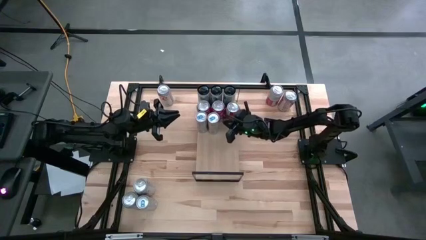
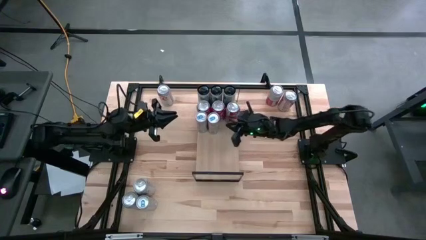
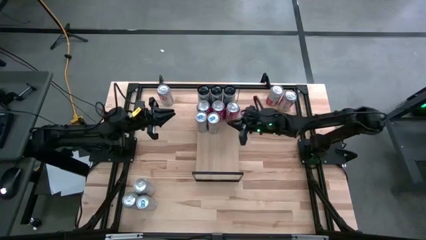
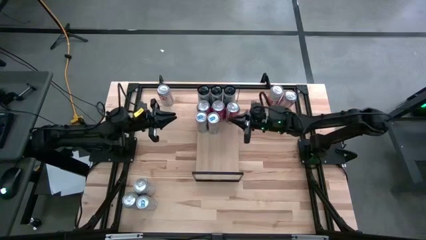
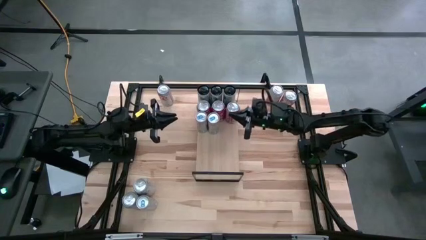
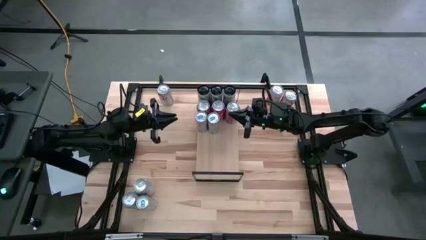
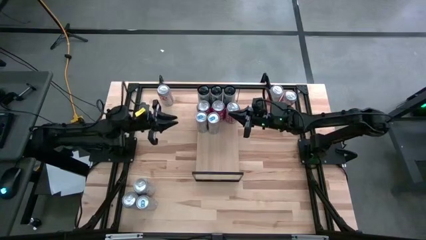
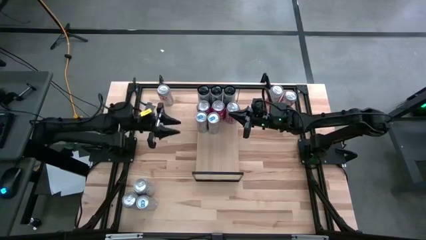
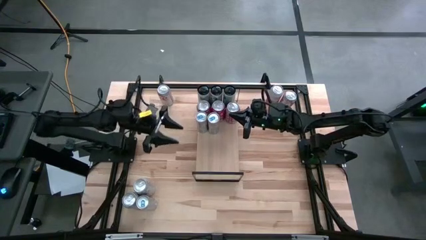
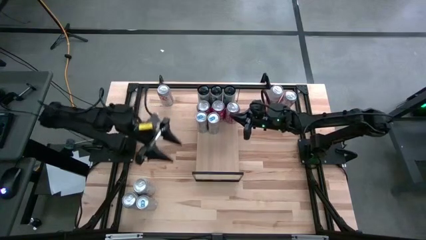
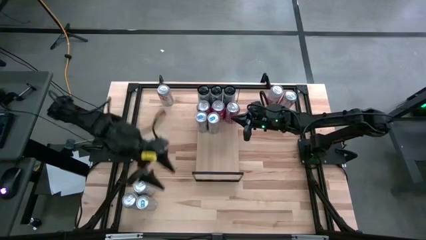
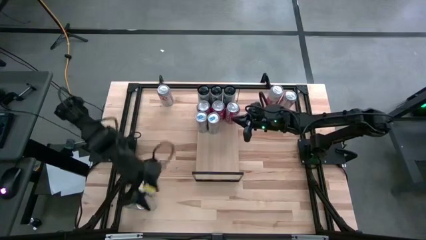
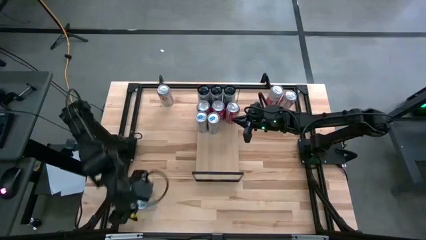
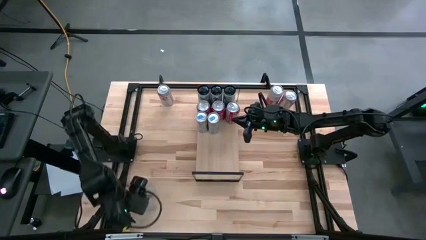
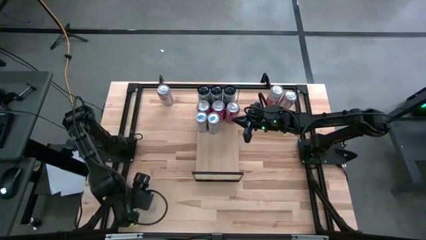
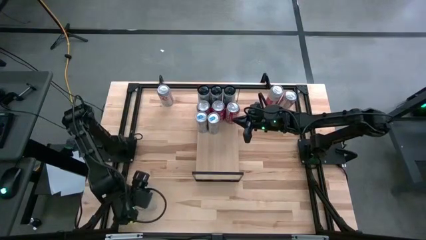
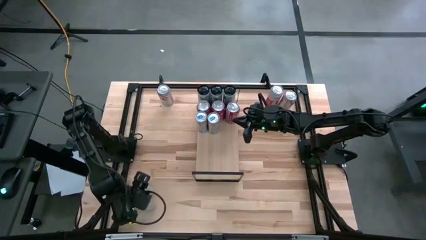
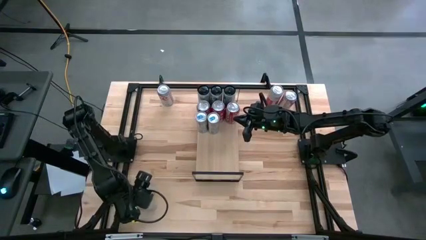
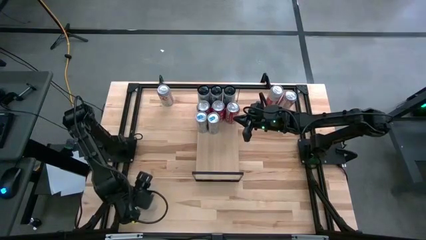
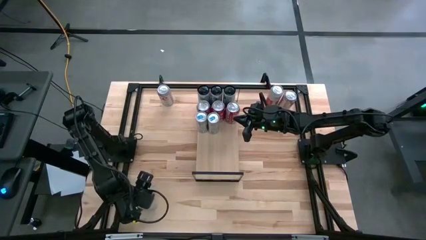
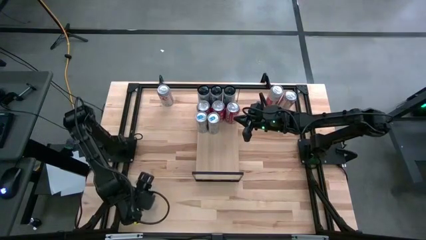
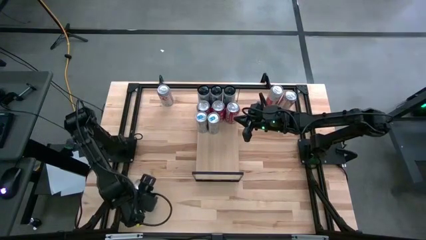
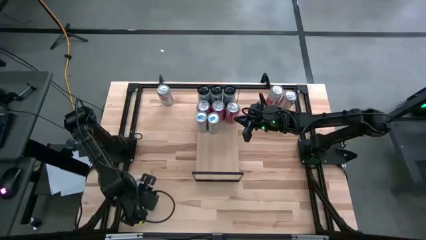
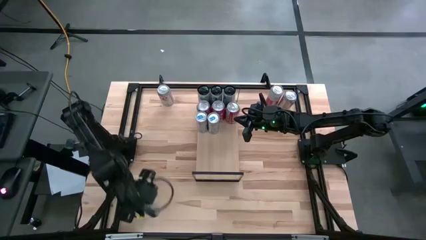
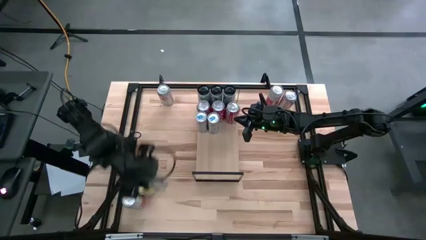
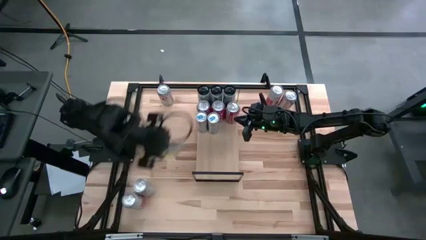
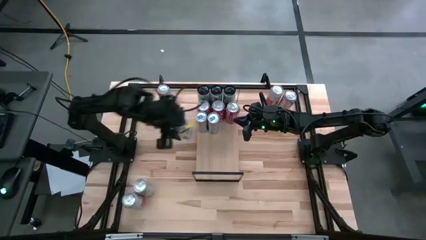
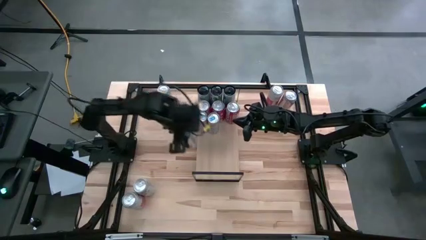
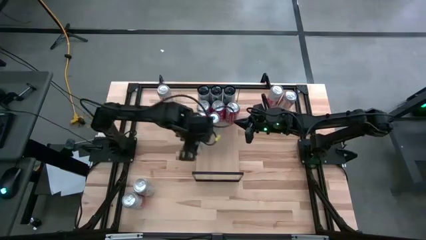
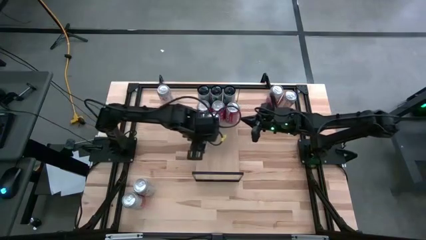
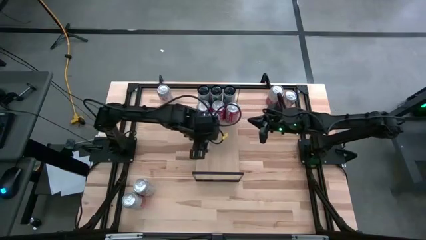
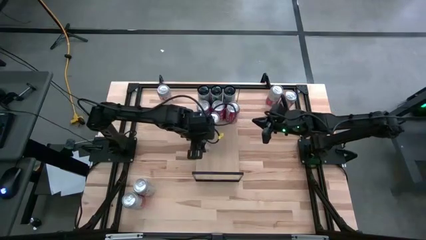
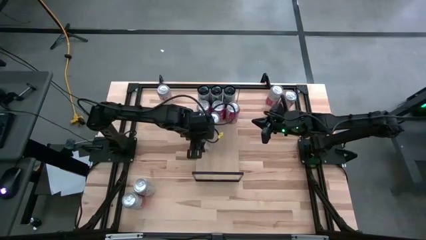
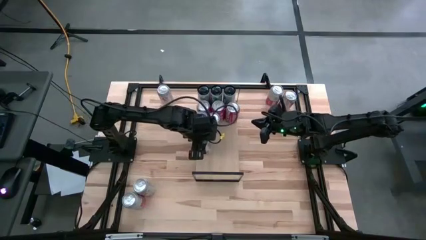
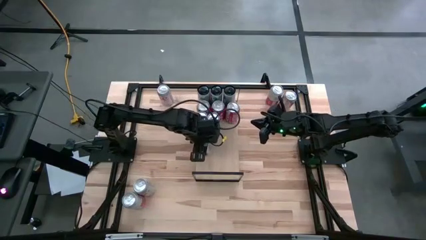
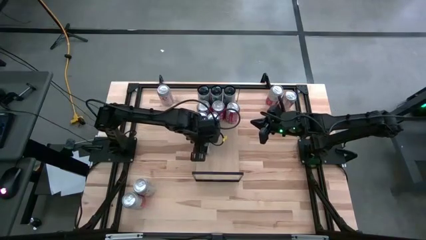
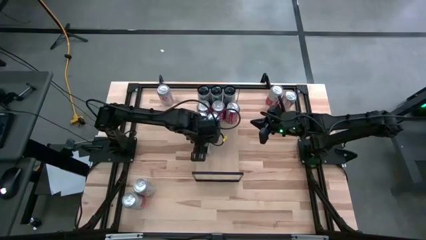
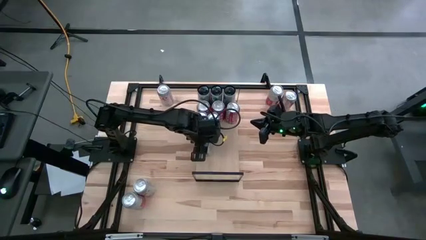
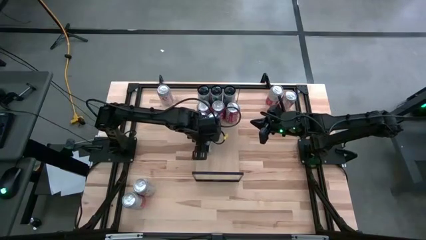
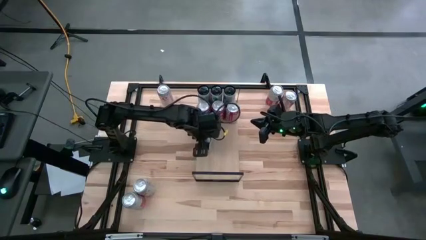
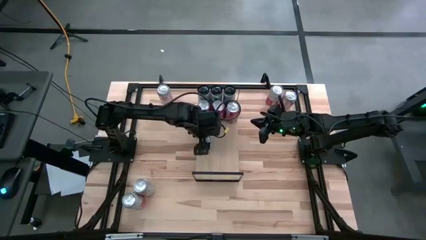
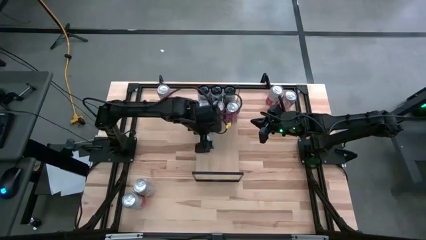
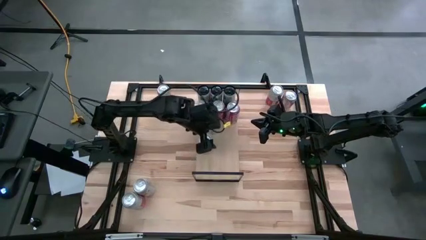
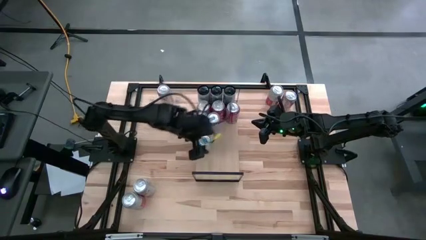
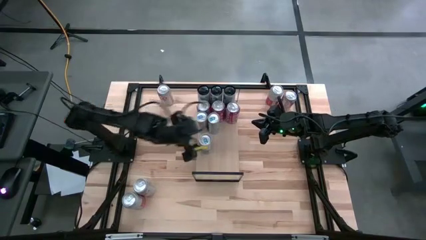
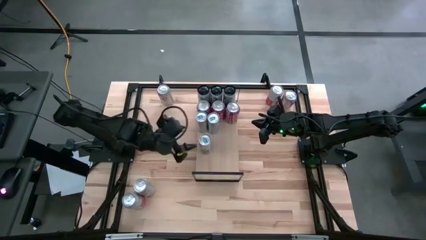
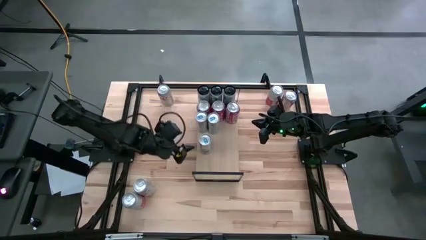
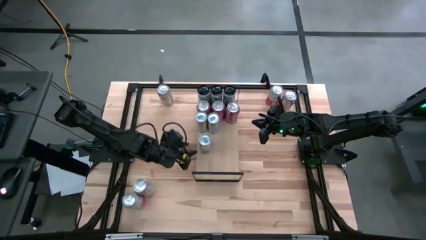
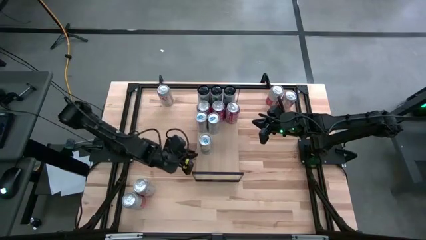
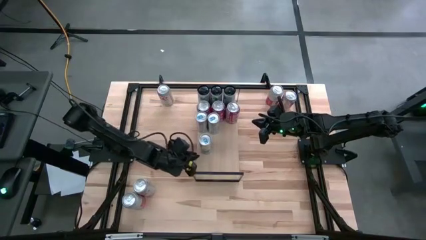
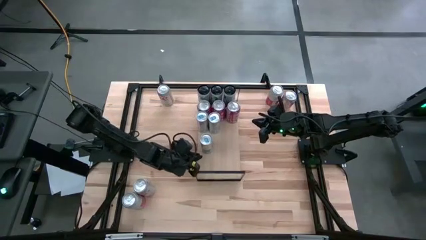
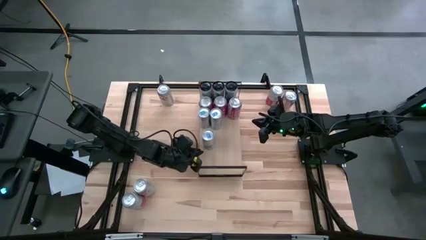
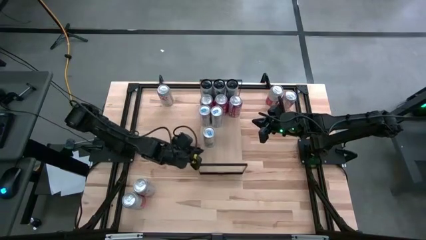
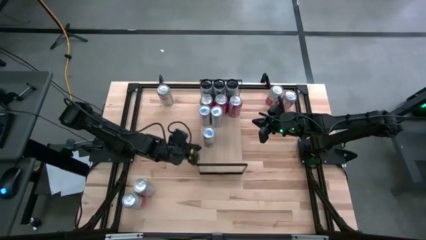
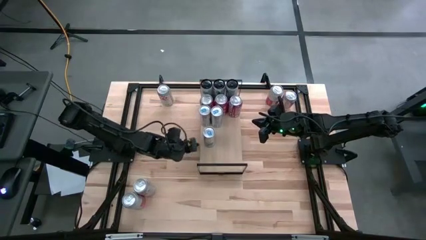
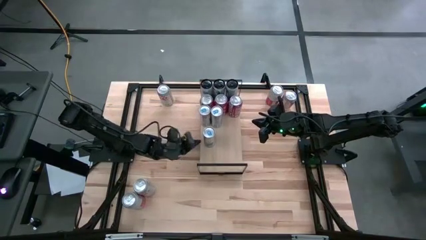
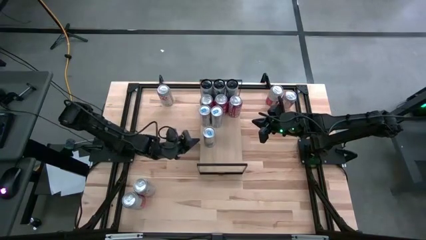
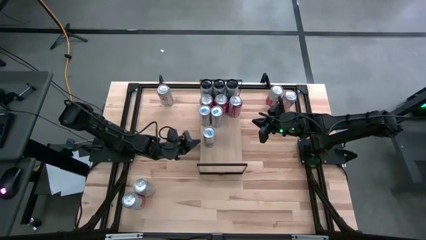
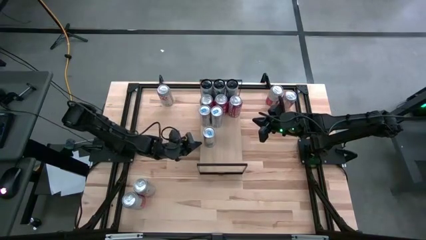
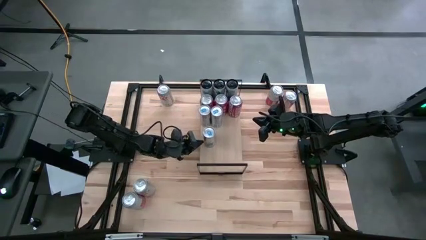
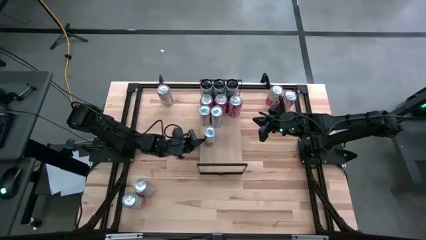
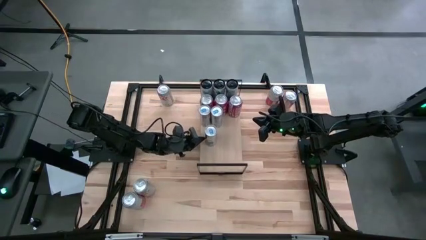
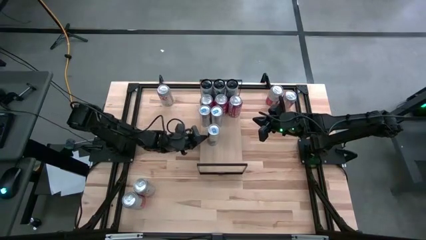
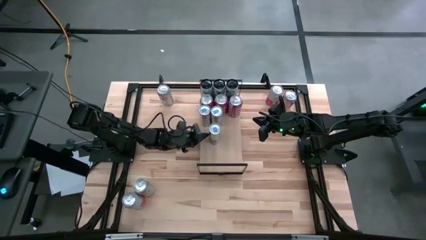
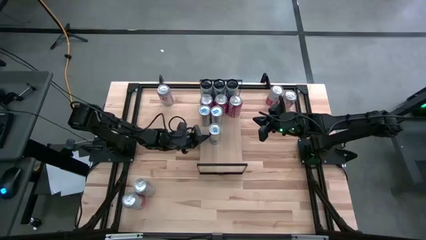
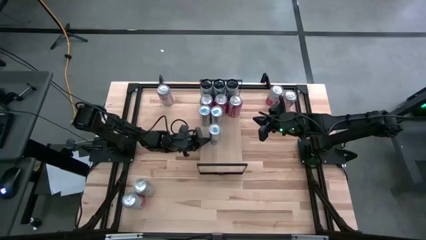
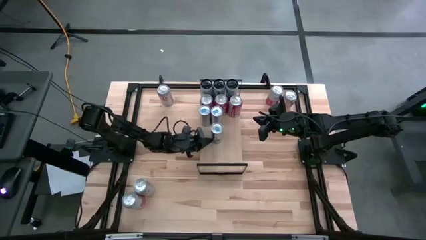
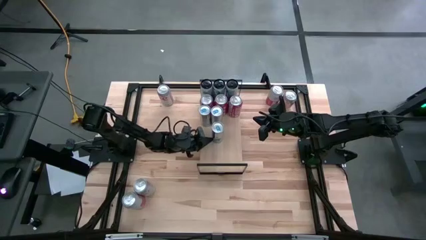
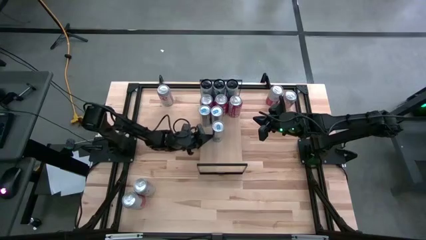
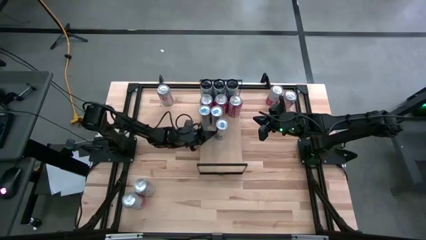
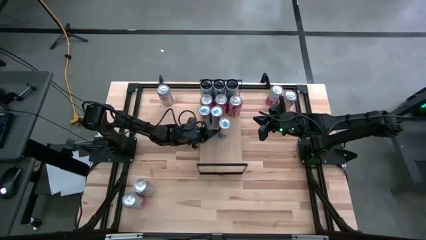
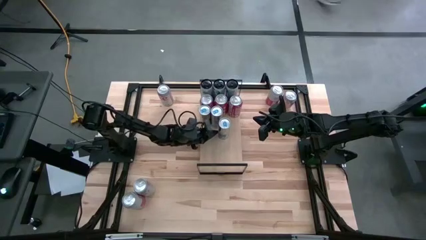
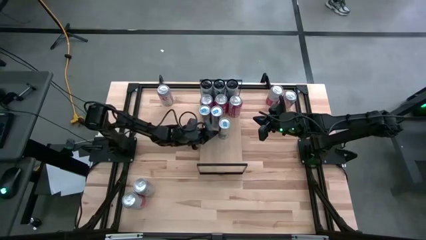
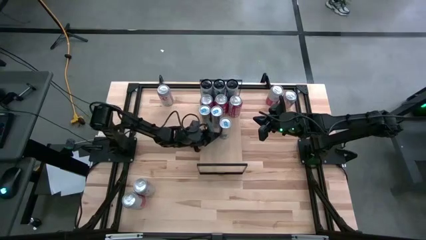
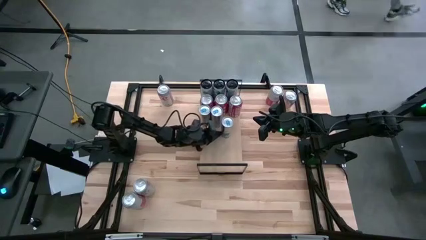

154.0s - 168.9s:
Task: Place canned beverage on shelf
Put the blue soda can on the shelf aligned with the other blue soda can
